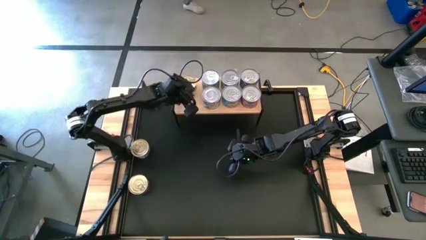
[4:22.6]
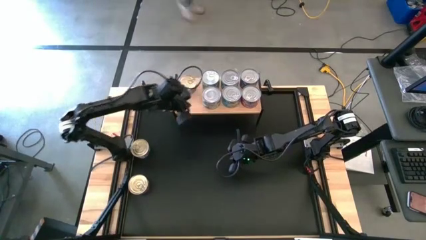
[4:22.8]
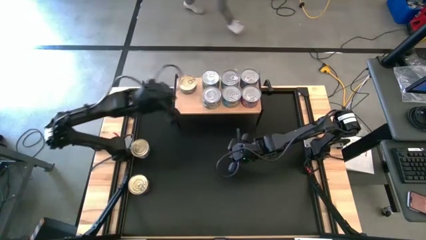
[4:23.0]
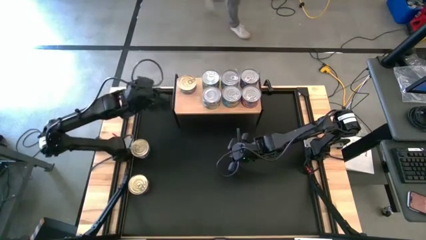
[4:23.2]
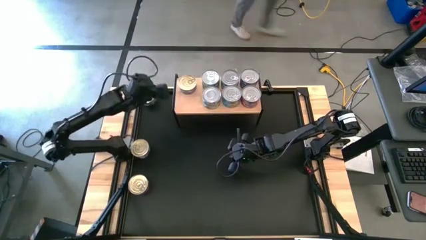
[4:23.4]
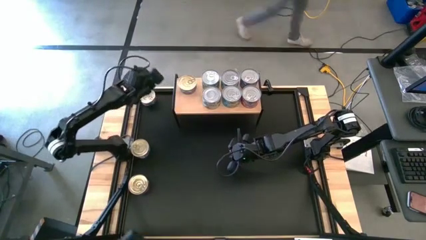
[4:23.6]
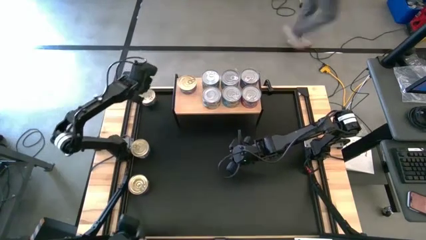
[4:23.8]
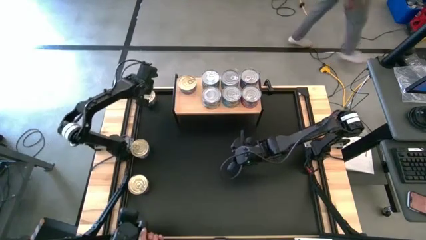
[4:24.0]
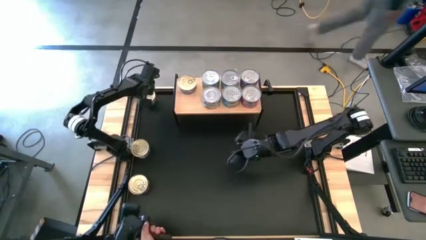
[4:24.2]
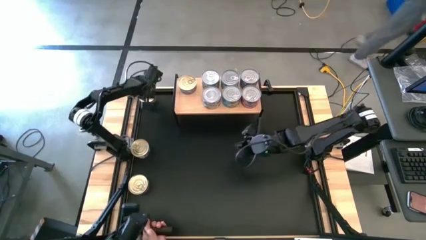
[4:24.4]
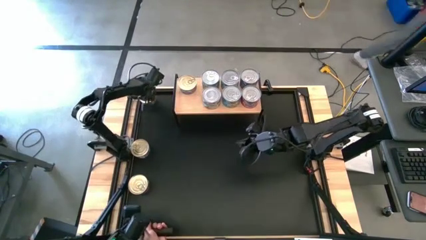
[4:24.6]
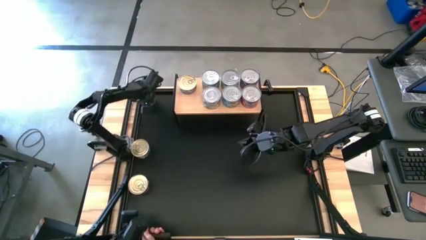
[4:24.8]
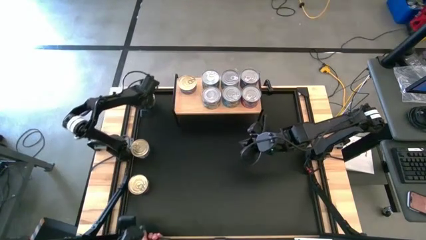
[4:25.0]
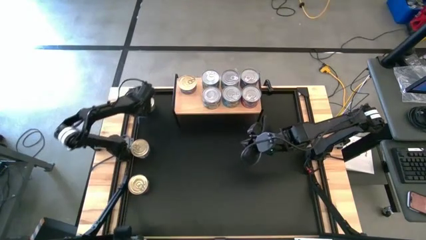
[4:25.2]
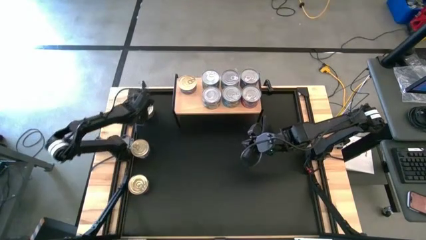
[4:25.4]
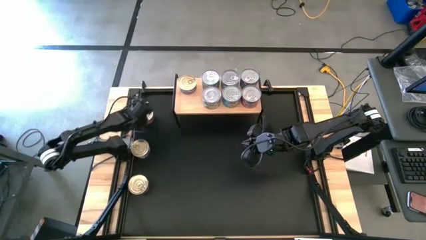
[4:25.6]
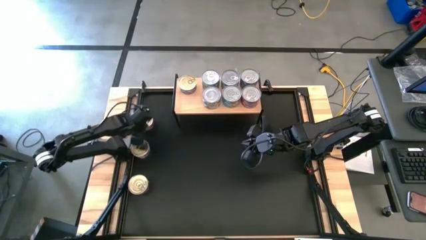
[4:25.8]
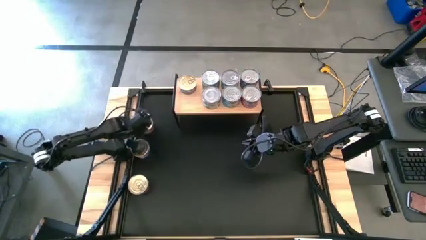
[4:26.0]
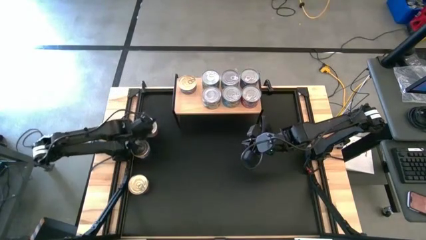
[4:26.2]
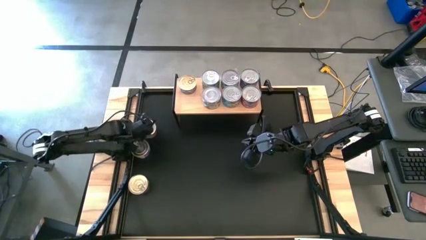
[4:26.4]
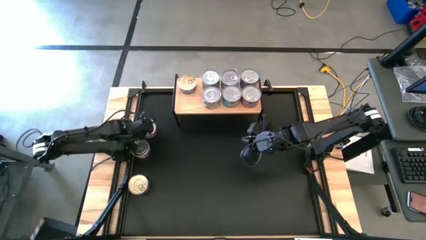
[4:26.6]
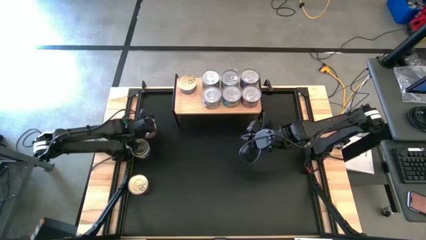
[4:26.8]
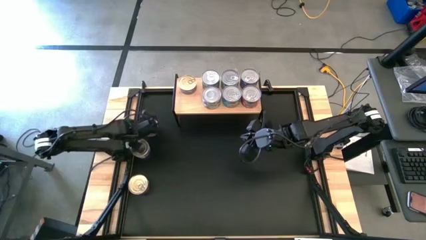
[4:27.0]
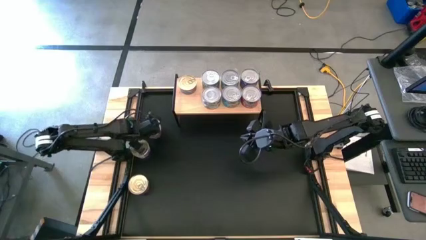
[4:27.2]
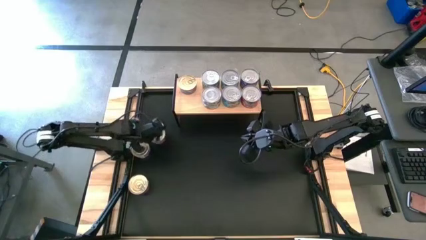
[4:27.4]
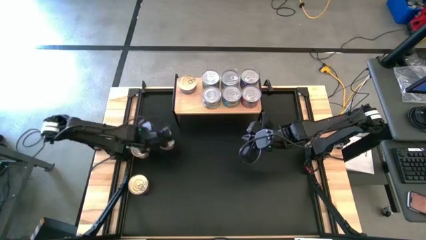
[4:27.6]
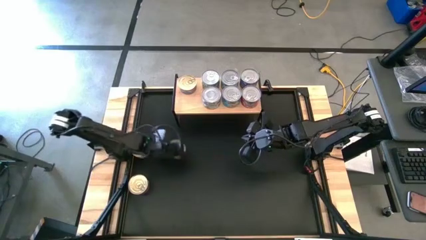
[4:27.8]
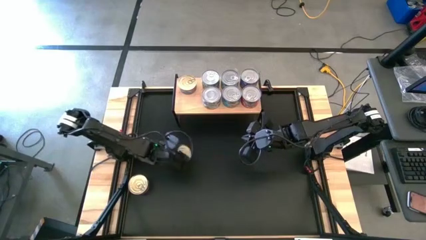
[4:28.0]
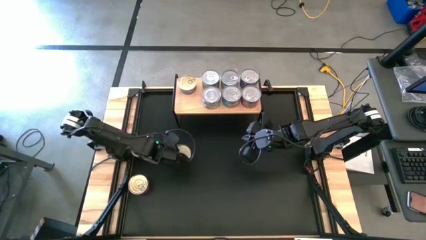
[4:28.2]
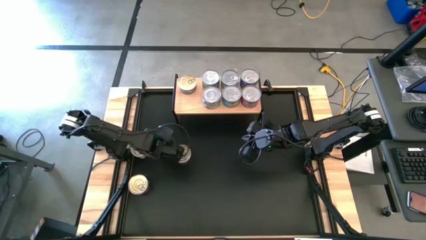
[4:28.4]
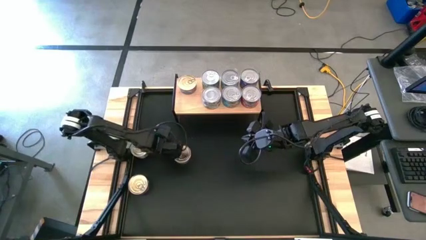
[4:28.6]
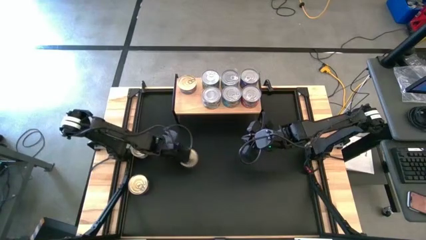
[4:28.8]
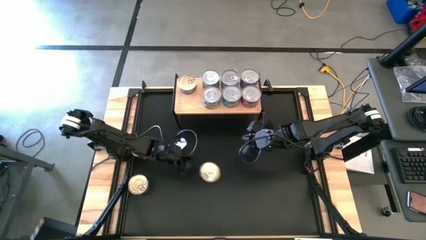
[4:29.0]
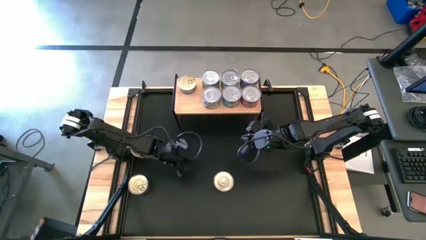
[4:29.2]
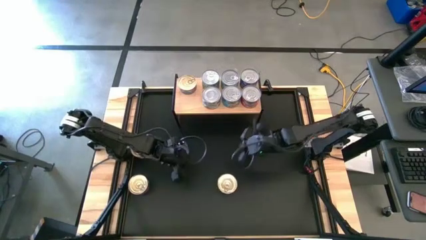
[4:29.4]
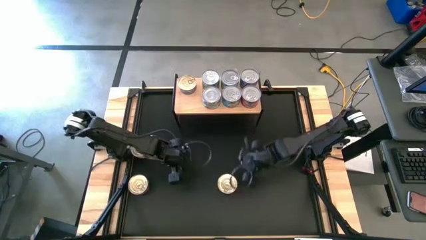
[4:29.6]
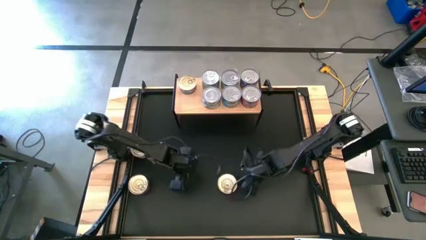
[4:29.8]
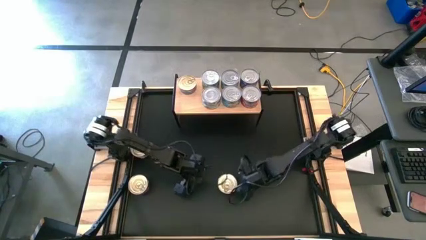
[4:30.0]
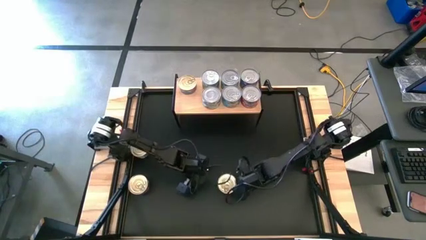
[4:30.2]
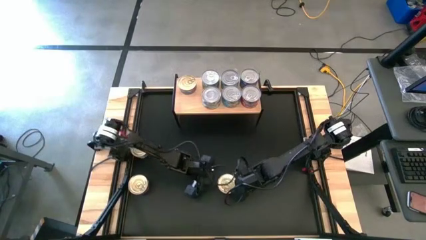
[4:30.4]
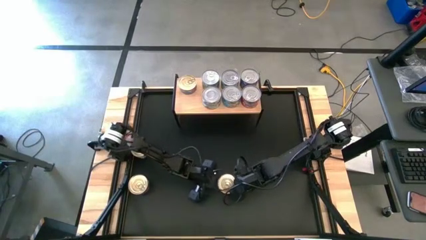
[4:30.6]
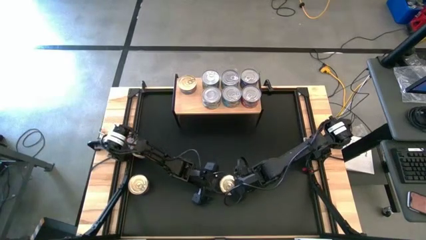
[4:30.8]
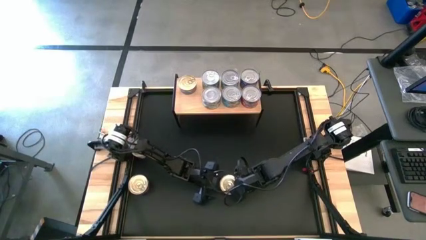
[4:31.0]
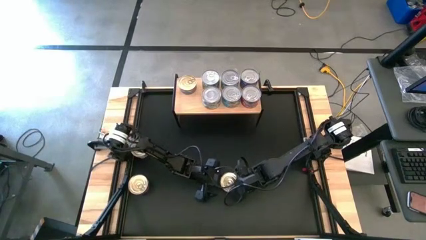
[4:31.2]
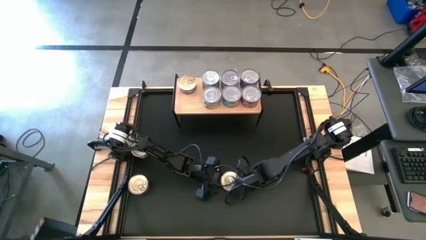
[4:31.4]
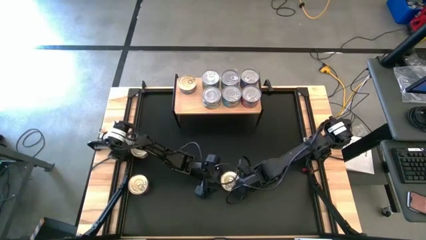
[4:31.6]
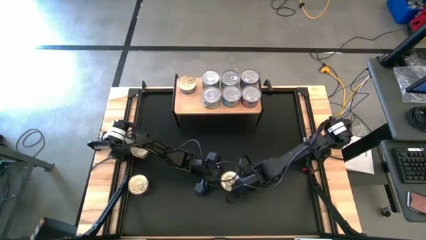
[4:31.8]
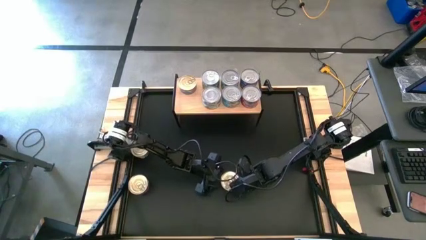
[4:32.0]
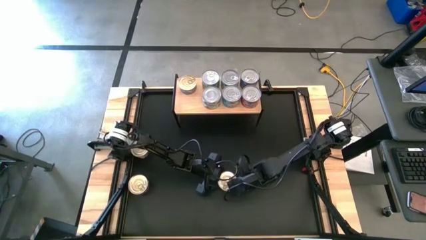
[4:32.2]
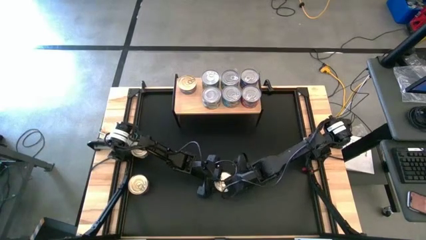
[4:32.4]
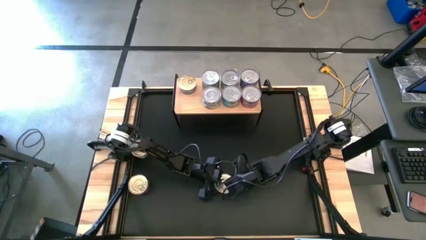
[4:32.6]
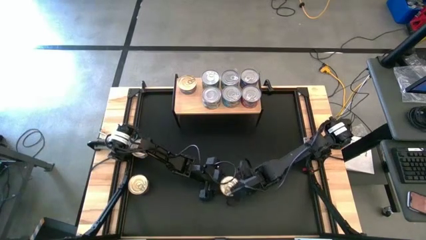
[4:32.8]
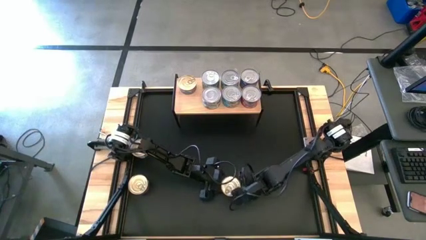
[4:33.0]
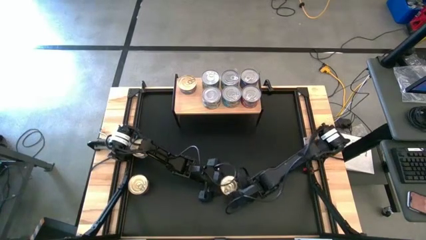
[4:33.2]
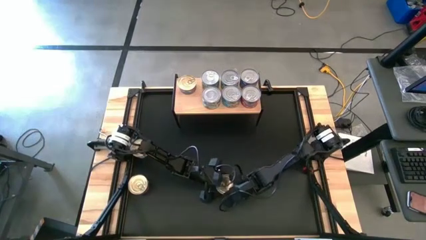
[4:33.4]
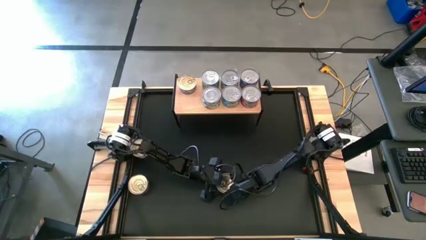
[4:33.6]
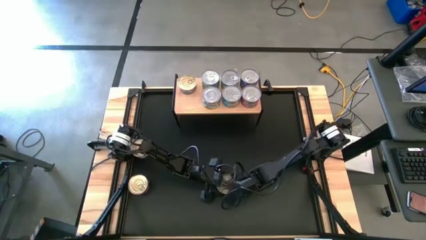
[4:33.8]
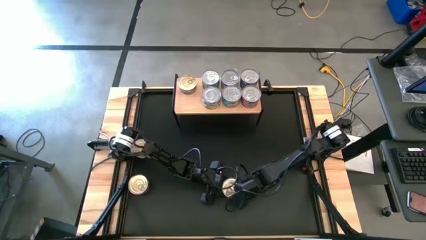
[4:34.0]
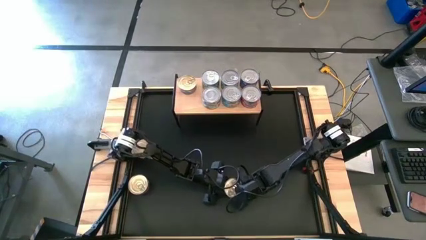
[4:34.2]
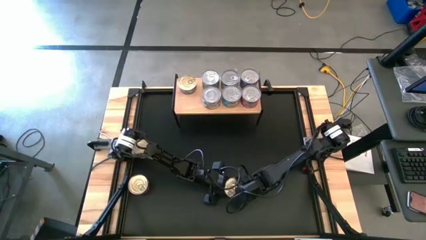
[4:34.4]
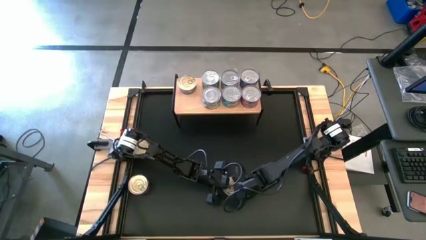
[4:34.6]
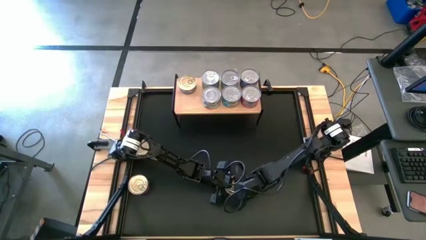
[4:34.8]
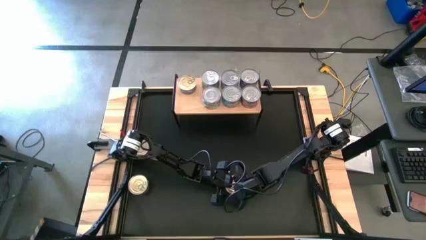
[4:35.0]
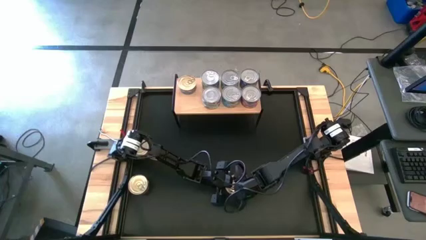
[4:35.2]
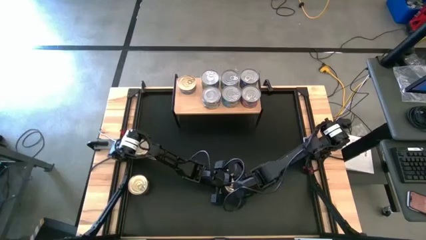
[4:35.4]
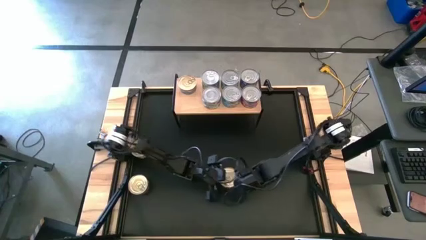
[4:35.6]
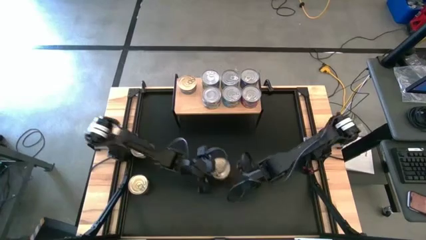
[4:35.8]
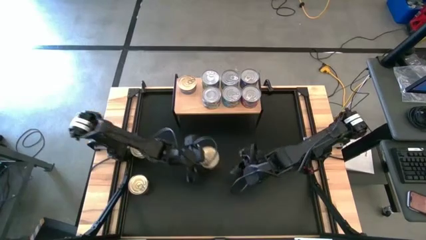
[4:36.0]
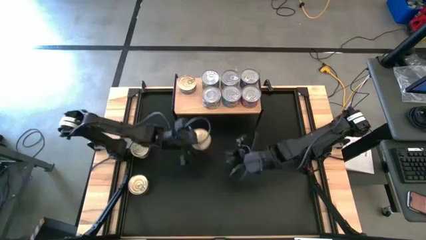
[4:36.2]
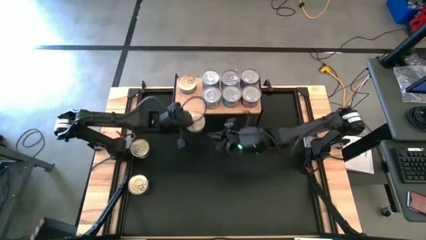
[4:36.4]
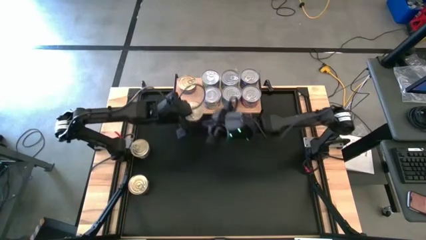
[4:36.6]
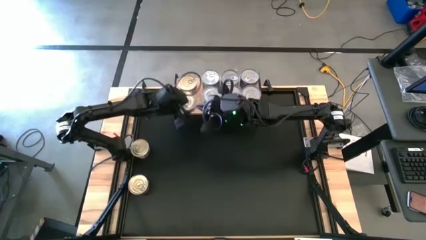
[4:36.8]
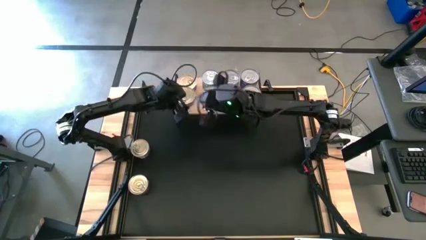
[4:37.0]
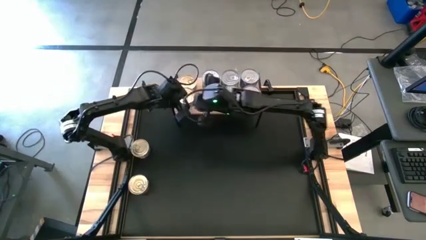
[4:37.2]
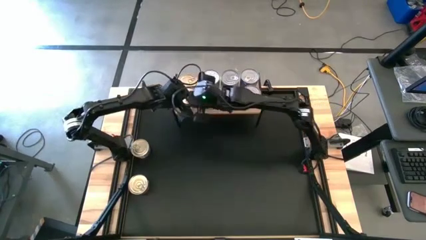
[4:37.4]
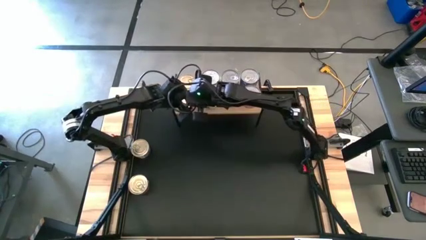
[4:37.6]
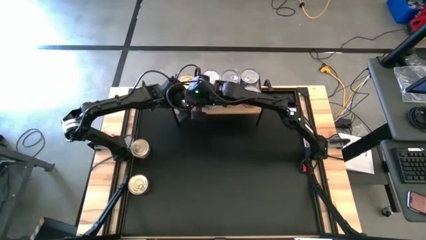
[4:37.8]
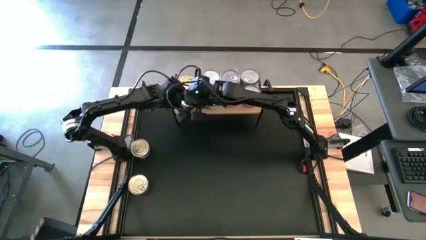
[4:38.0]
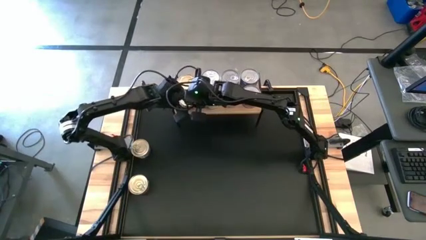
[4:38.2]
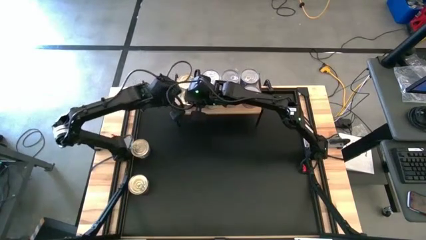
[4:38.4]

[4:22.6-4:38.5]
Task: Stack canned seafood by type on shelf
Put the blue and pink tuna can on the shelf
